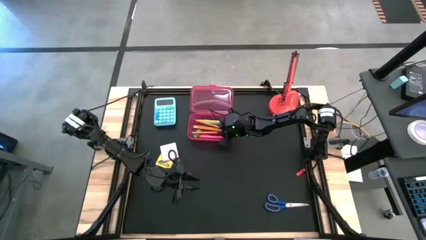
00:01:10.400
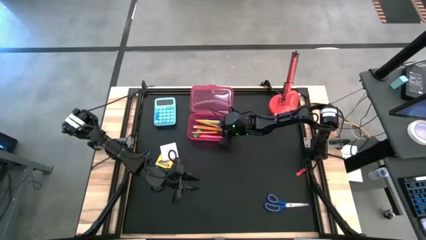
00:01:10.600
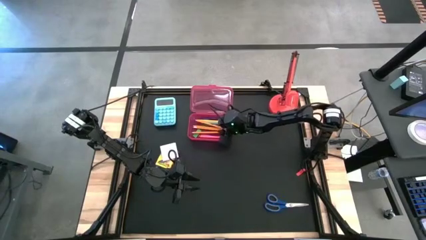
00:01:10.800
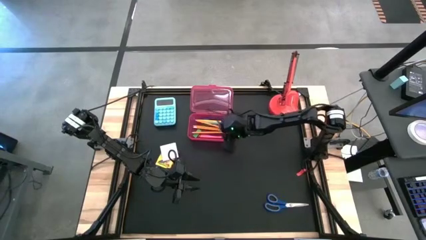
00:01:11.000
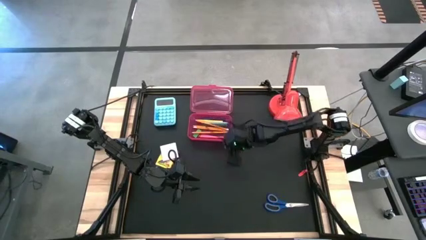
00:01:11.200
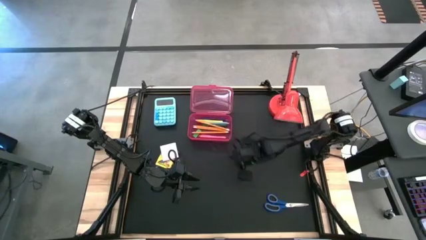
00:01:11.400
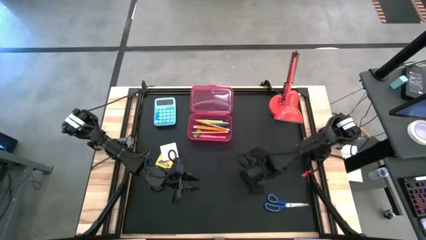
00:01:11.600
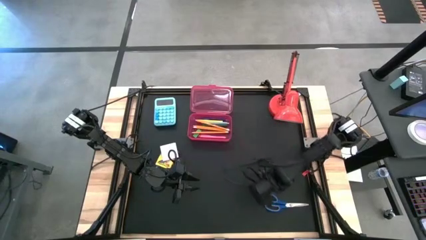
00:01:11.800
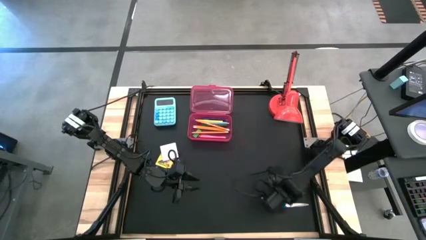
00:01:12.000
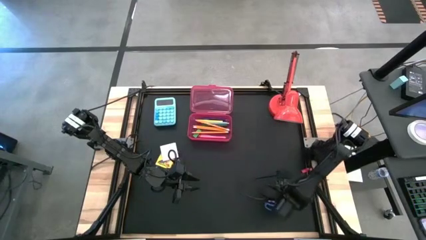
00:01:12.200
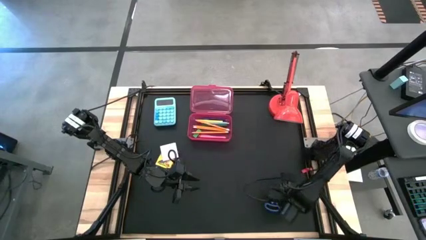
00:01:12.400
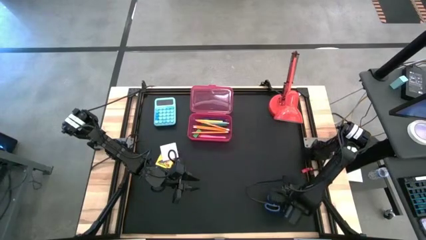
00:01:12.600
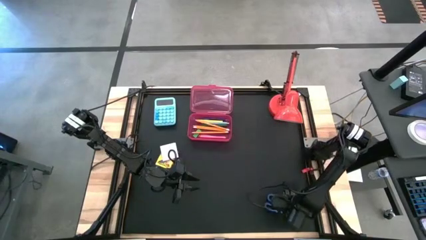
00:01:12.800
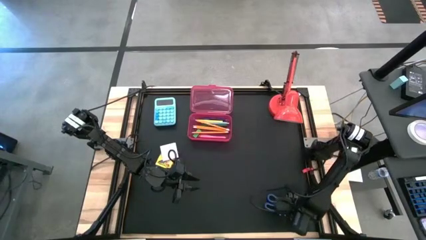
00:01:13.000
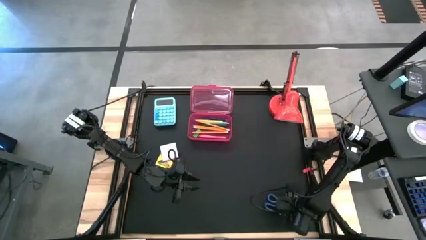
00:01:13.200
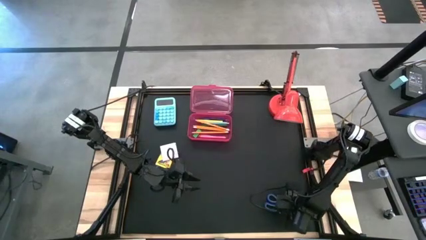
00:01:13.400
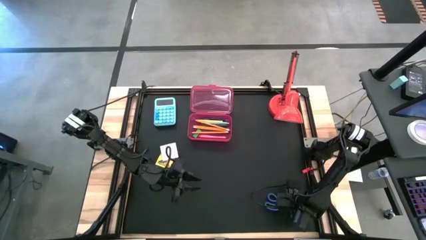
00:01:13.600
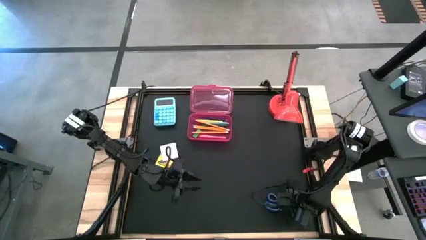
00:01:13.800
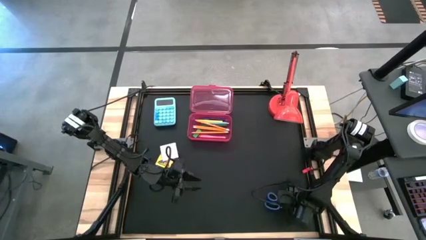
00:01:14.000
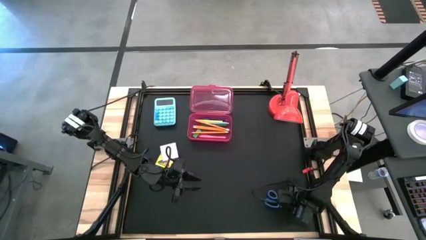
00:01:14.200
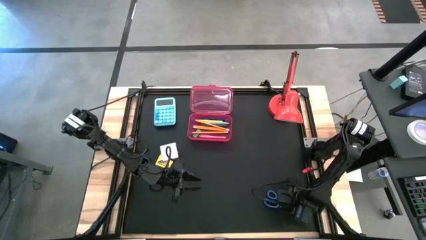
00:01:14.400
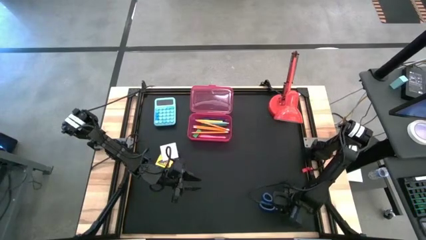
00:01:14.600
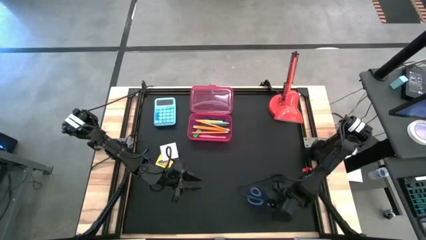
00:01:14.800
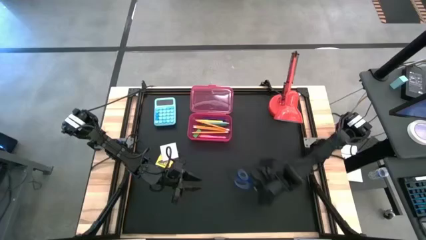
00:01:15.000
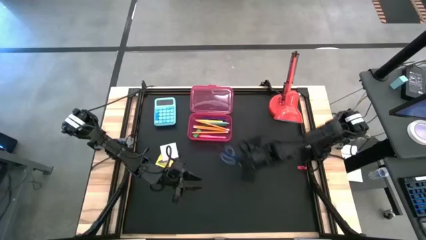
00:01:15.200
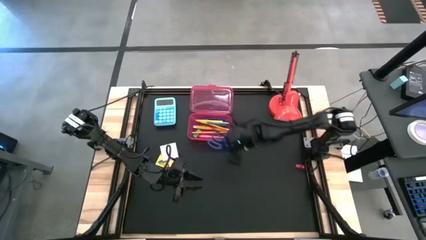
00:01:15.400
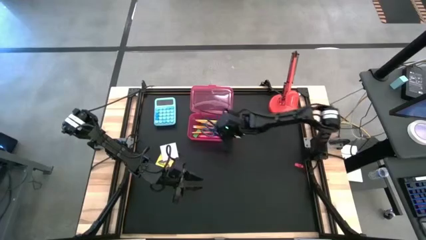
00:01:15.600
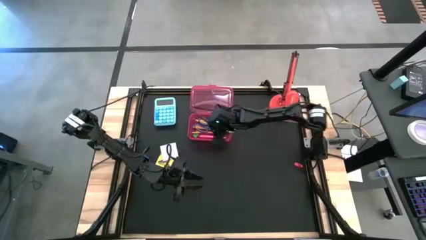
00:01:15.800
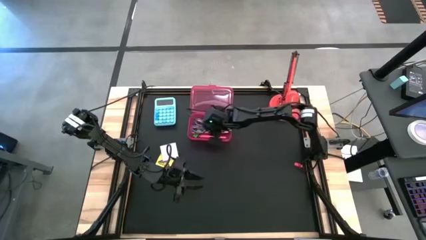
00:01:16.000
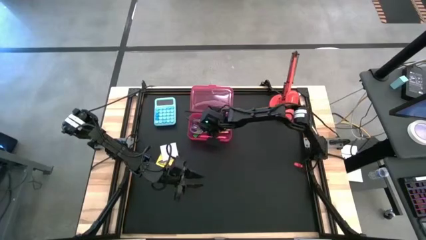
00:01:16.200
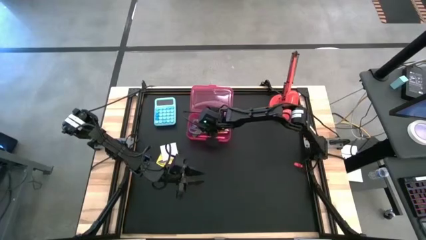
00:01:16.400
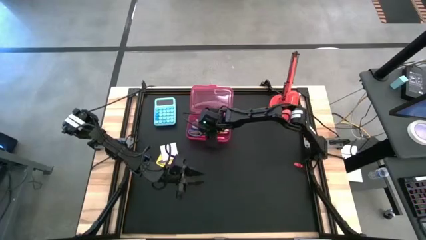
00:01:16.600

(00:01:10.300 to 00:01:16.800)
Task: Pack school essentials
Put the blue scissors into the pink supply box

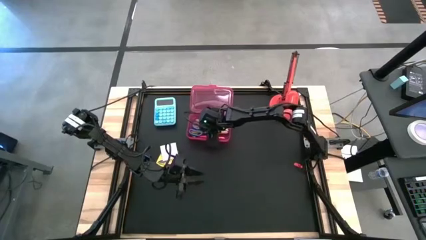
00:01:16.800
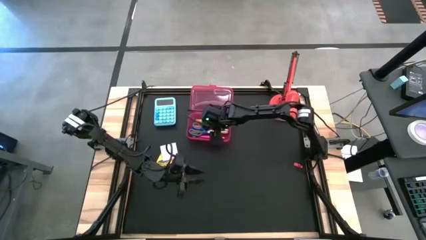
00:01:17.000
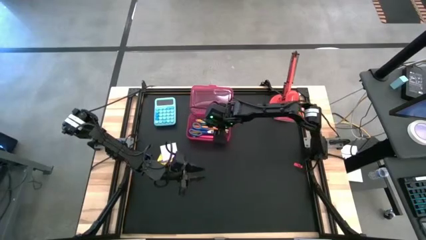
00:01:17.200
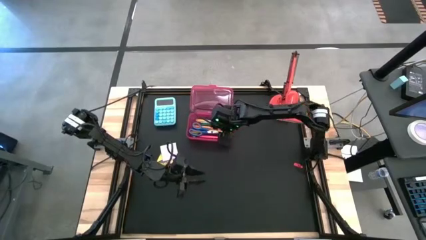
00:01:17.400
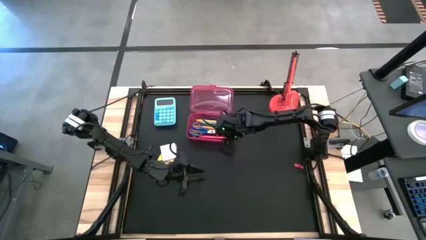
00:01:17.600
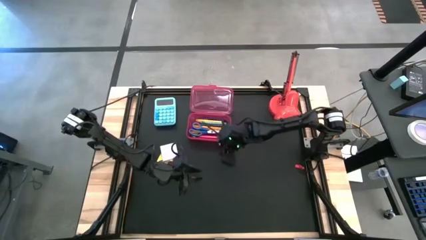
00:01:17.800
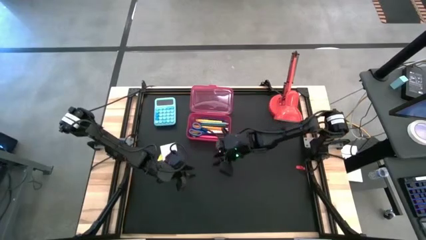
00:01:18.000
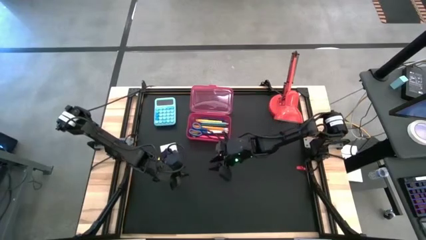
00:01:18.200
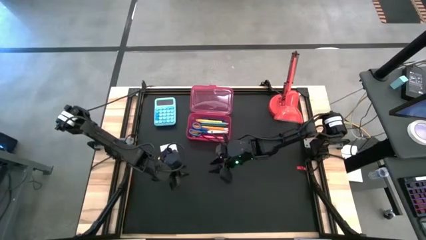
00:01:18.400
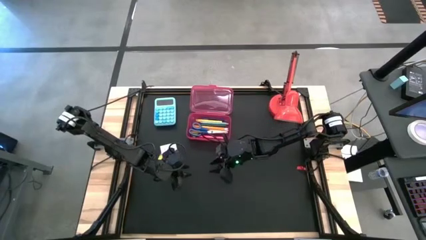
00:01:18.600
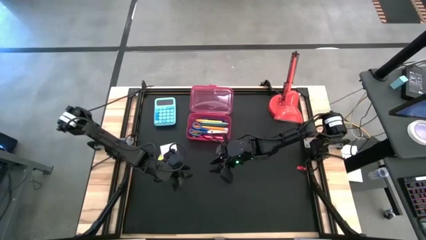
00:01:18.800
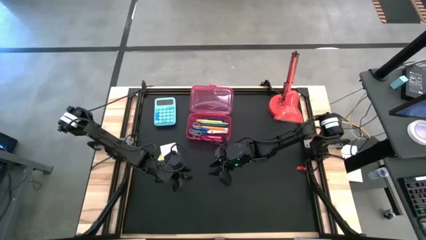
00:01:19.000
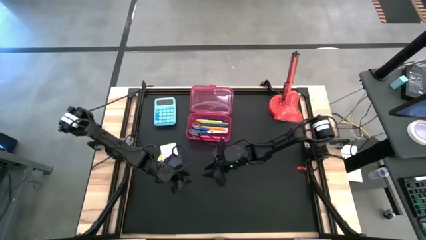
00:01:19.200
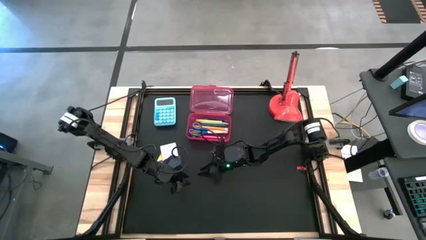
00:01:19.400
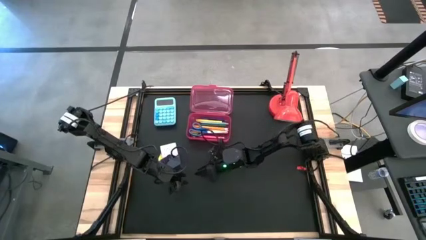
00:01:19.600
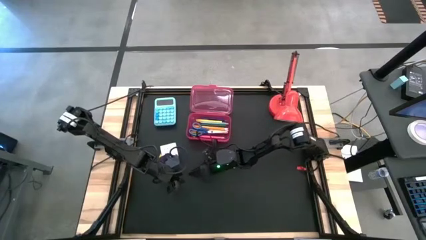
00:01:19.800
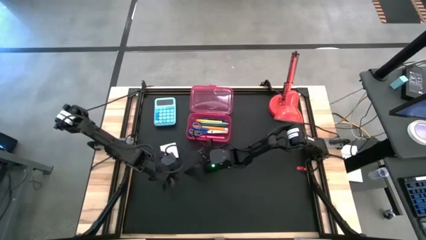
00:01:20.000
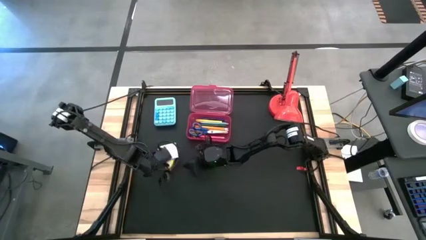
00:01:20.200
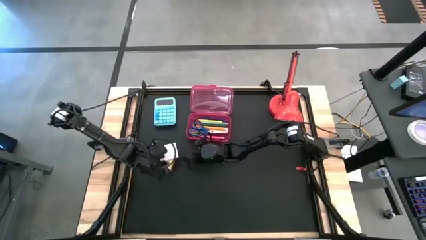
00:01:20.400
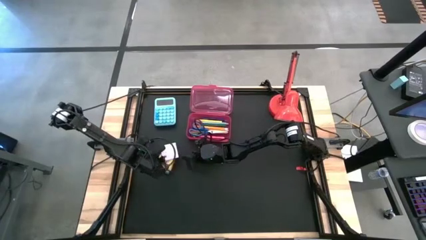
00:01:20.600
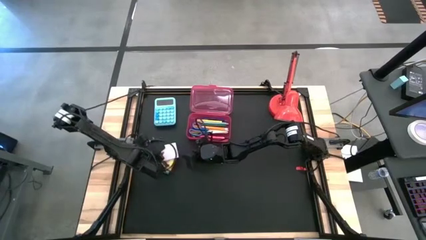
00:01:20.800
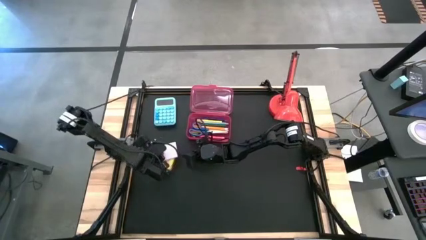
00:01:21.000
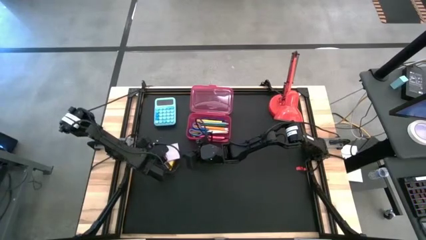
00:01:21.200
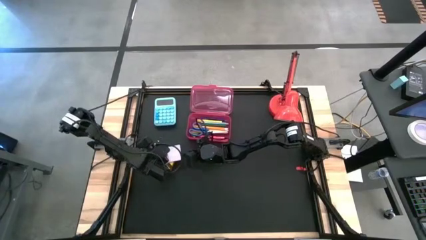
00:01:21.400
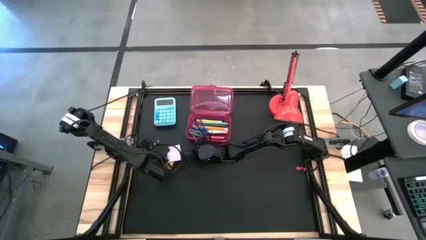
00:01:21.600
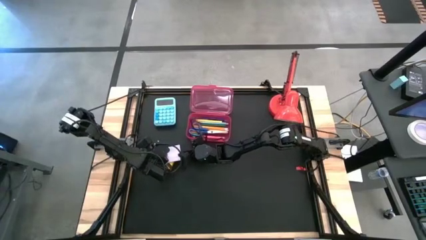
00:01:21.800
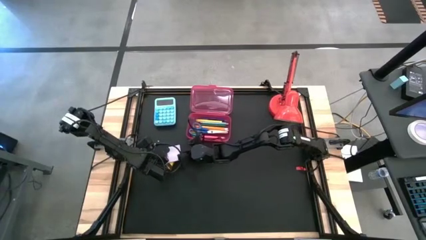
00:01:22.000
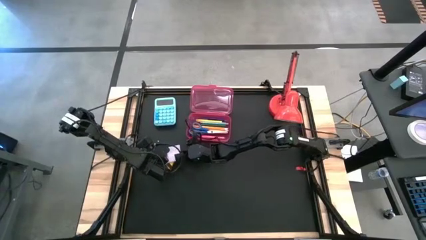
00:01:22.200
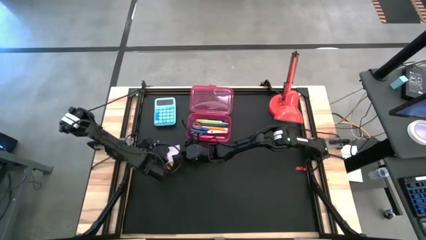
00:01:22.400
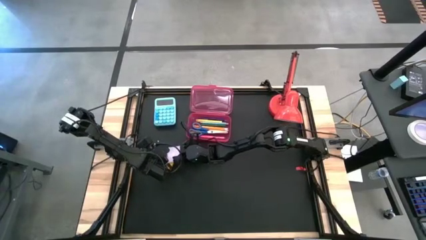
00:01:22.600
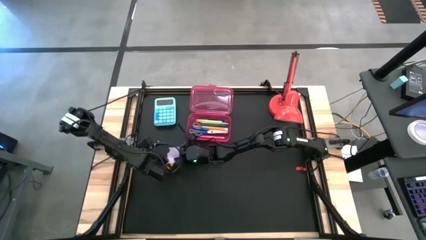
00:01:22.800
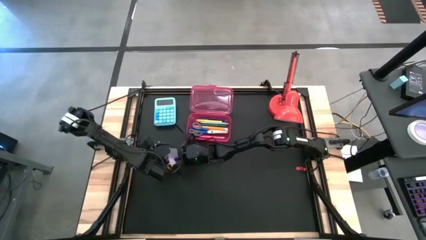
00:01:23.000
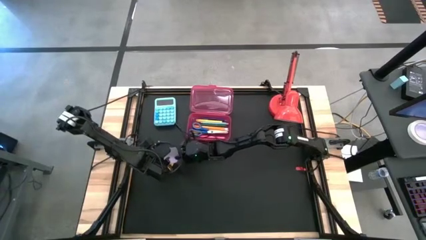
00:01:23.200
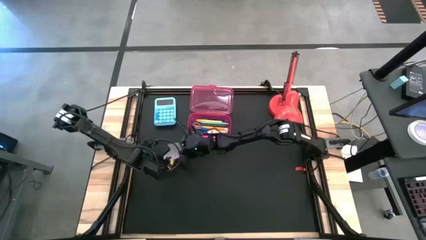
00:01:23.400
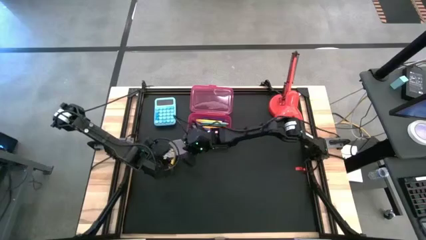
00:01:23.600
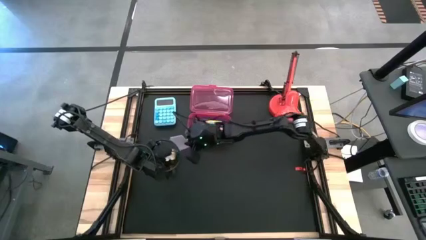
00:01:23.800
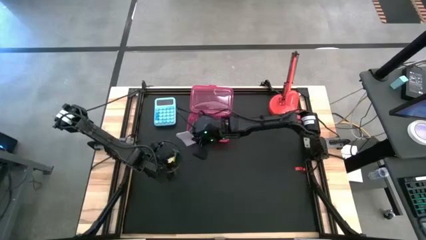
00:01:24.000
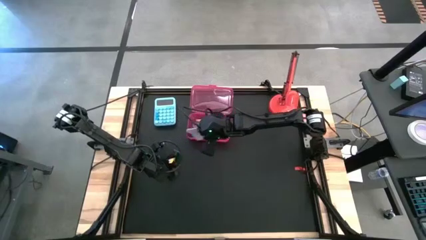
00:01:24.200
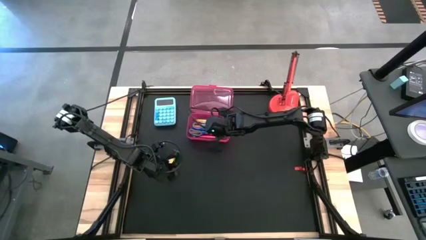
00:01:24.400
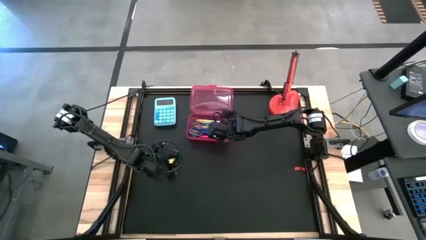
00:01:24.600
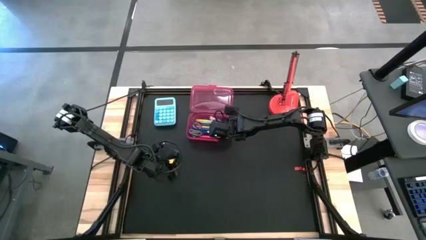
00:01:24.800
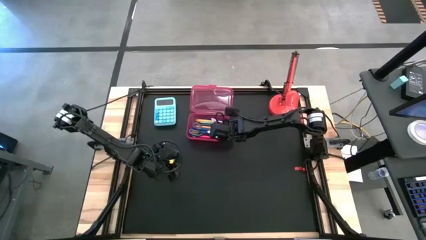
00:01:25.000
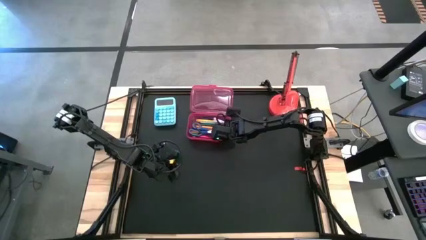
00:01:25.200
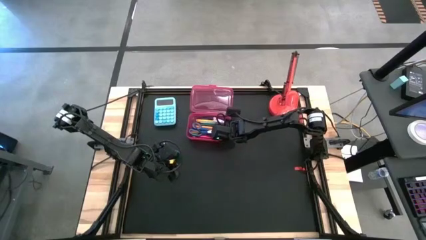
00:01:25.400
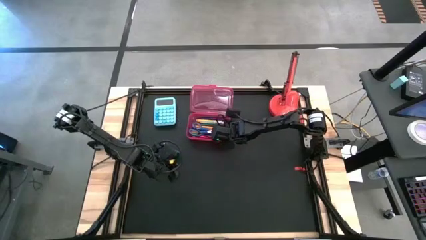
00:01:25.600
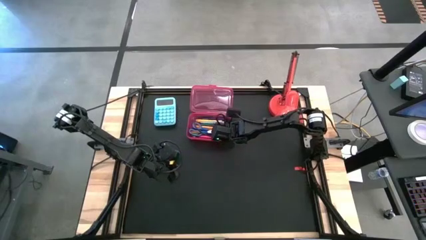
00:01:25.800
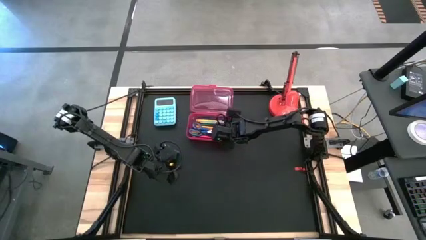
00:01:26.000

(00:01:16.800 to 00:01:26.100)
Put the white notepad into the pink supply box
